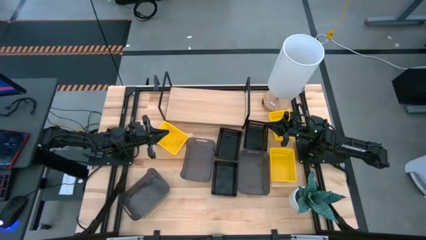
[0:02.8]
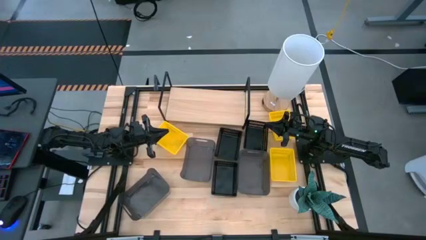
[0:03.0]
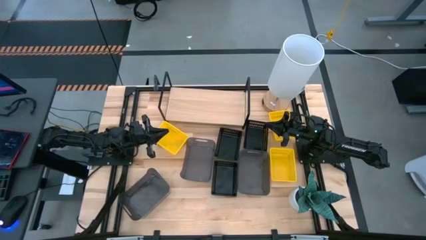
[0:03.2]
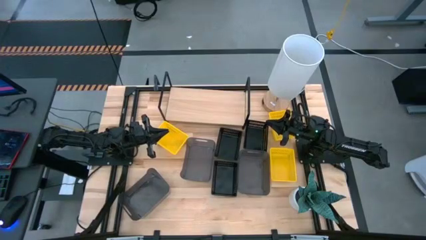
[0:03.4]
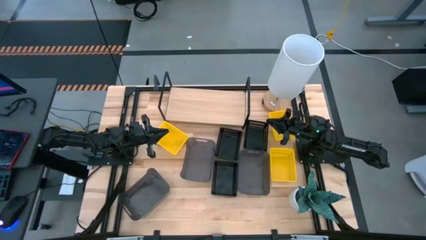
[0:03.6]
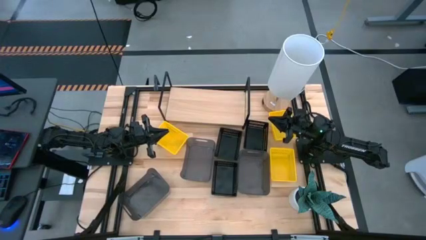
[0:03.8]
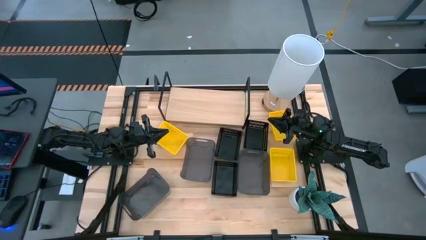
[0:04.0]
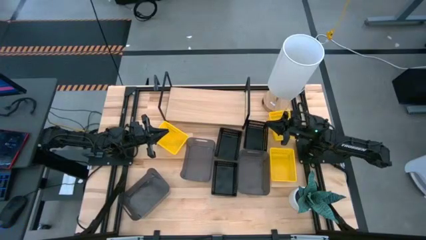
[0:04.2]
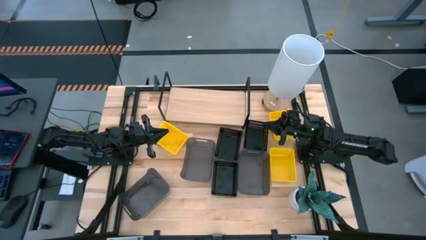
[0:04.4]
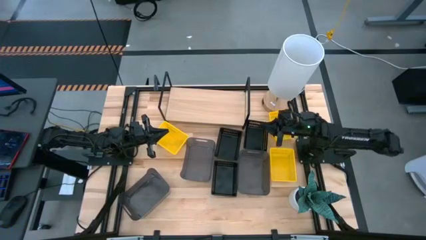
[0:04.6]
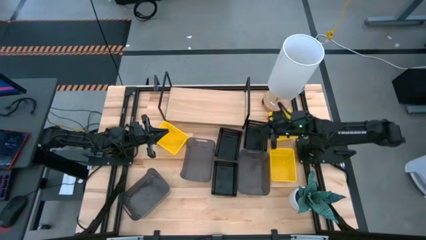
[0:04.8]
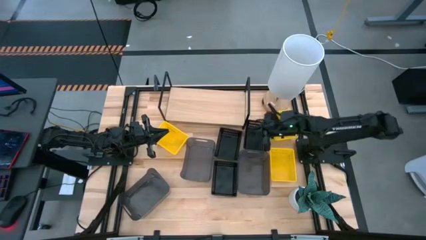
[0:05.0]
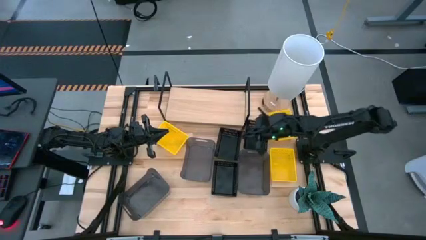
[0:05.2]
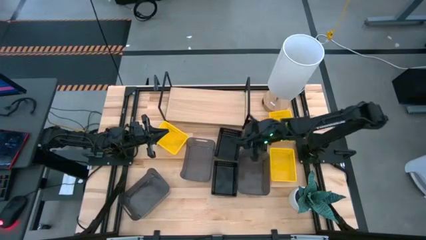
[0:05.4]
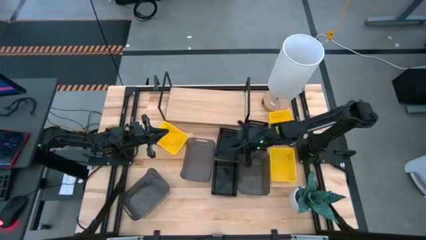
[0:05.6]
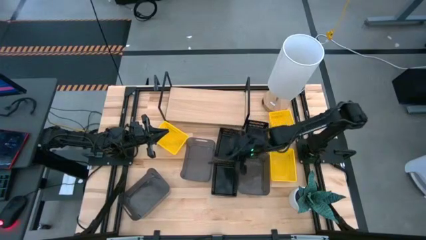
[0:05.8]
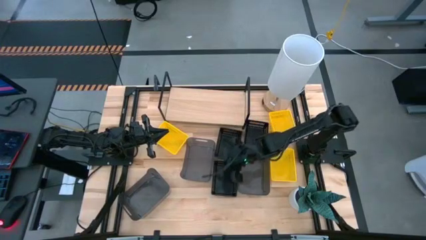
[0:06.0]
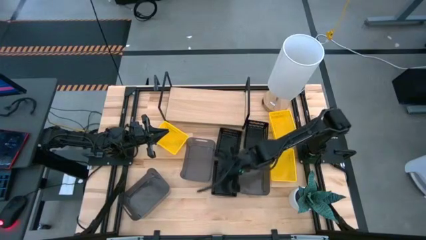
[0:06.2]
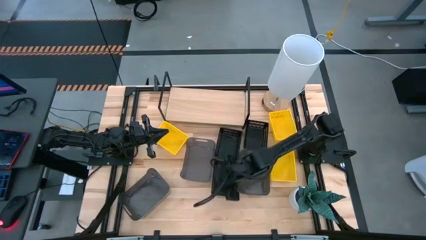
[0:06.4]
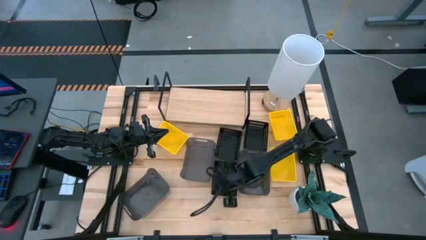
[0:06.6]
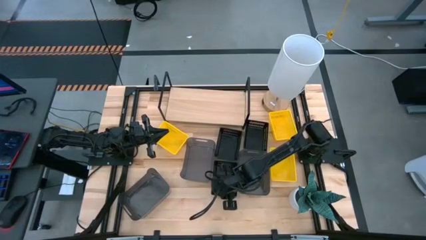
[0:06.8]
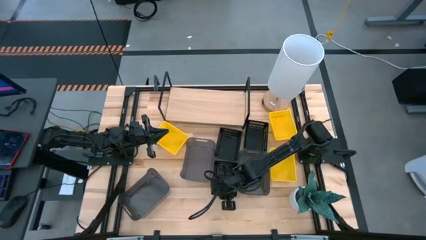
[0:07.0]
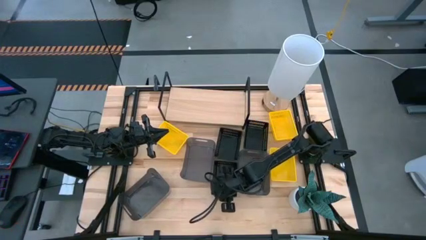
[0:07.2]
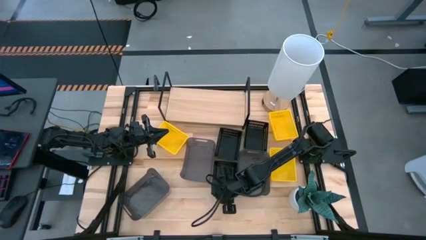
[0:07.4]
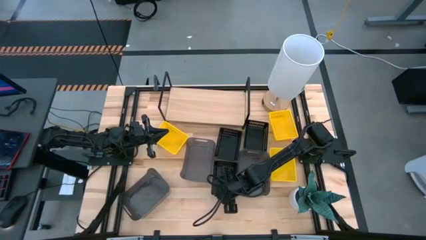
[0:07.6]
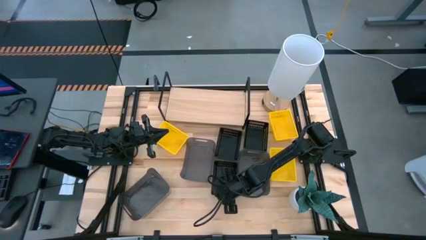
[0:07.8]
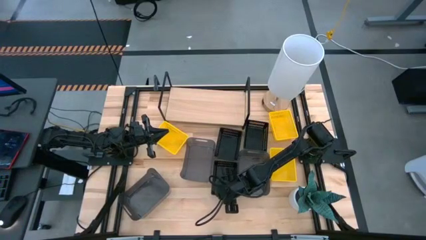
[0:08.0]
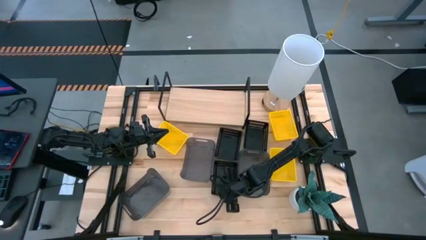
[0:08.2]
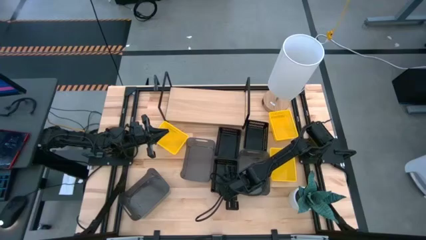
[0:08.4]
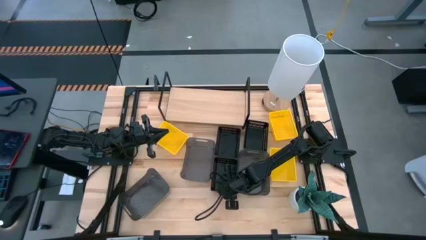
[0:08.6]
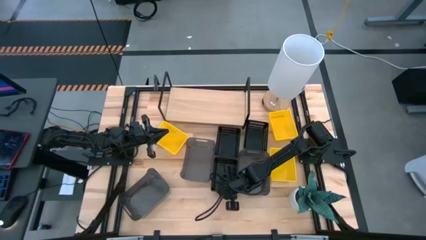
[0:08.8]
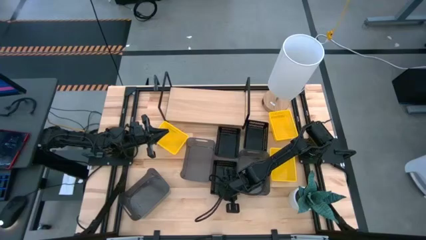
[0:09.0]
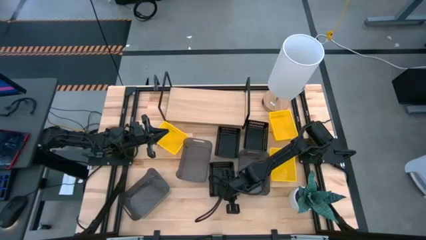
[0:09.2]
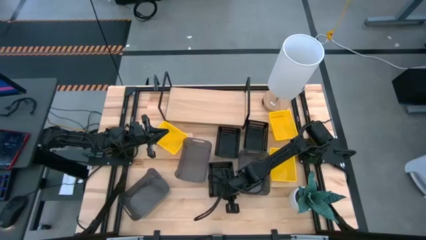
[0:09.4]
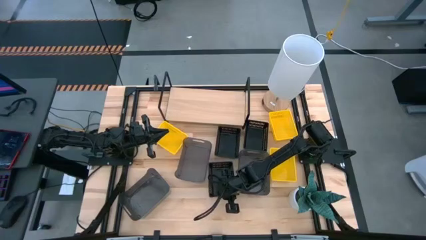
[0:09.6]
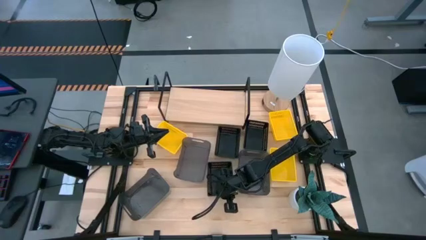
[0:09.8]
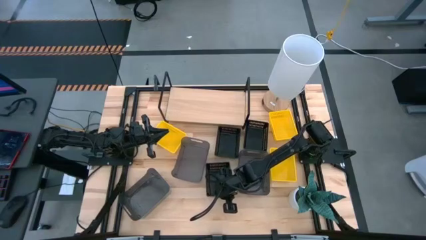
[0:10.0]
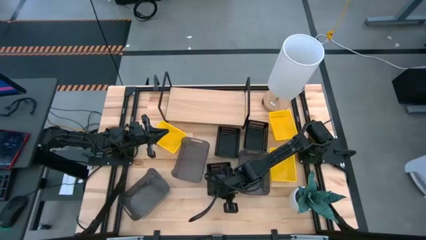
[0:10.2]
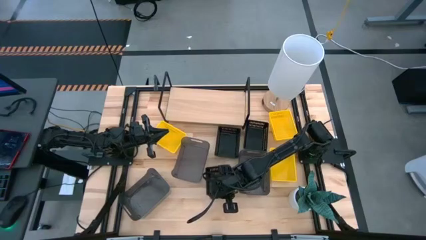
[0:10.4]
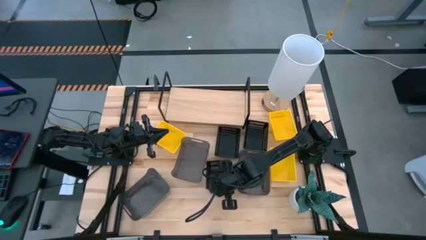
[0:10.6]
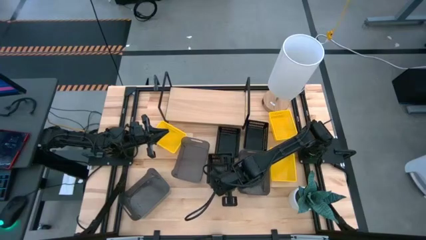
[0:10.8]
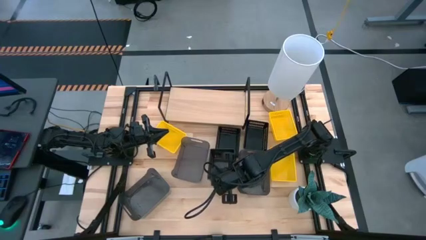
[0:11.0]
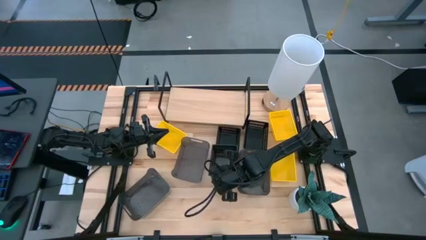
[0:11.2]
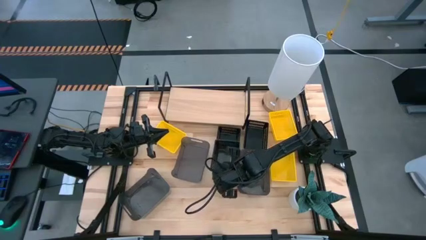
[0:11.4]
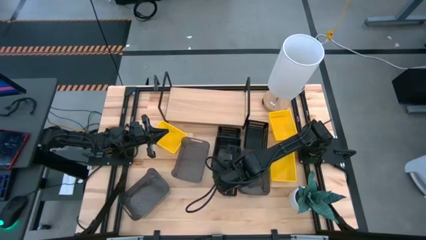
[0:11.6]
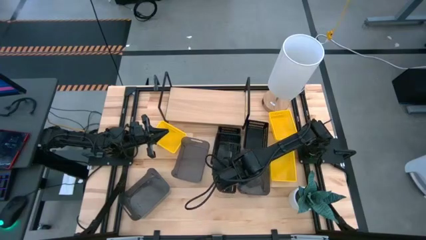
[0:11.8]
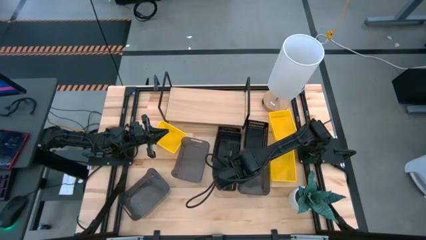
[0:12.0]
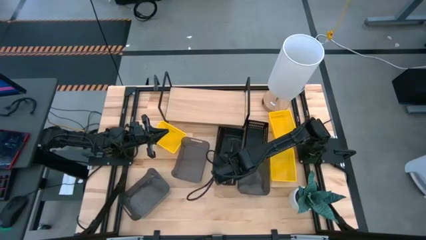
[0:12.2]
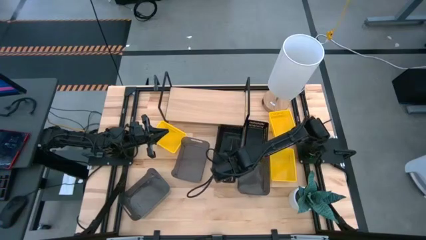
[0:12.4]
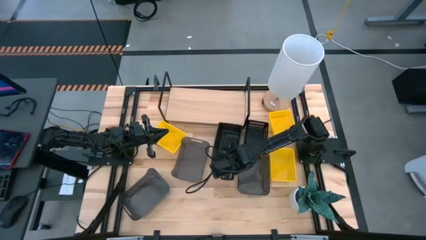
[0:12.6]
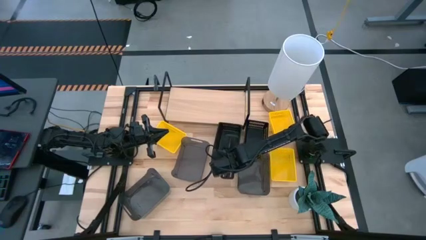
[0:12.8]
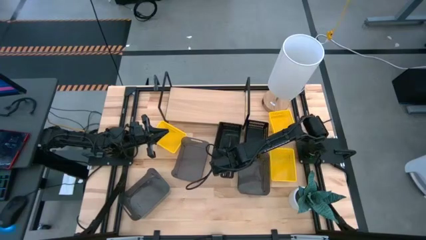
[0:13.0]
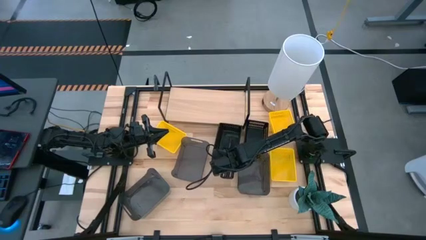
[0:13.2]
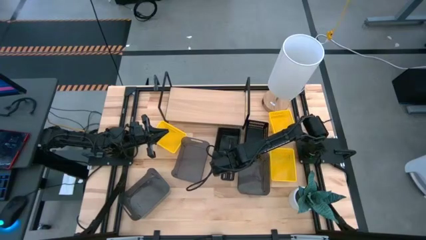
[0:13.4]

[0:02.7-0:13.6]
Task: Stack baskets on shelf by color
Stack the black bin on the top of the black bin

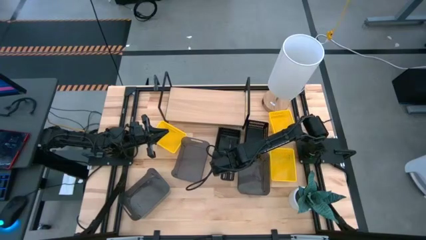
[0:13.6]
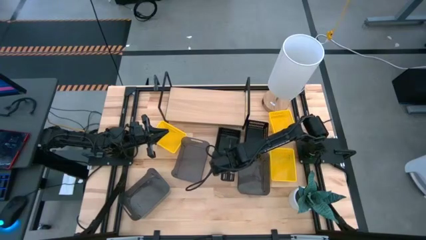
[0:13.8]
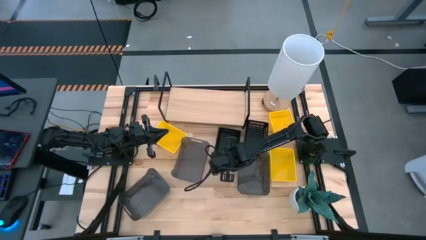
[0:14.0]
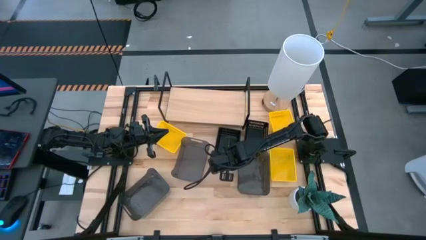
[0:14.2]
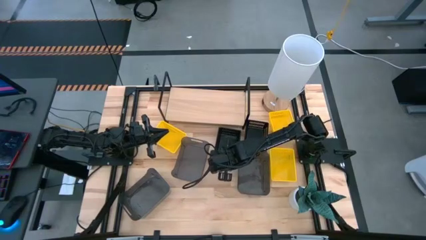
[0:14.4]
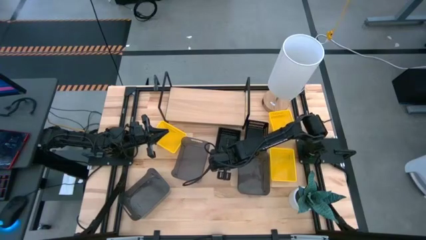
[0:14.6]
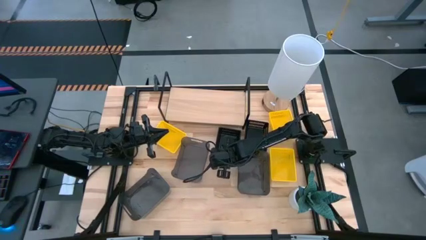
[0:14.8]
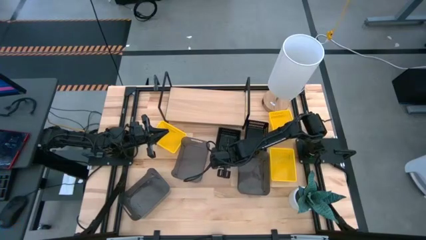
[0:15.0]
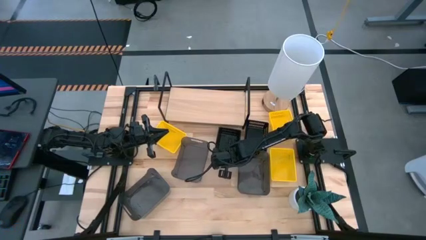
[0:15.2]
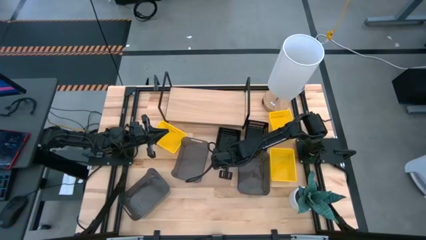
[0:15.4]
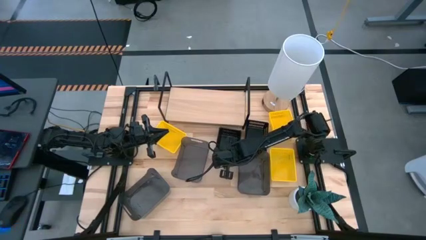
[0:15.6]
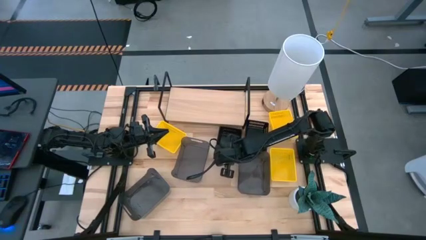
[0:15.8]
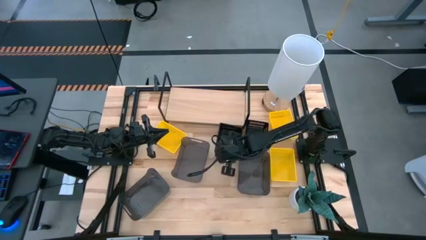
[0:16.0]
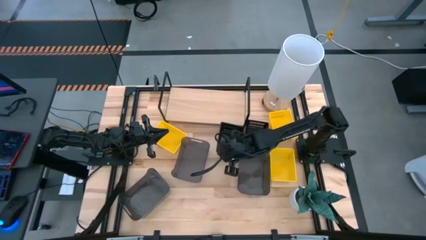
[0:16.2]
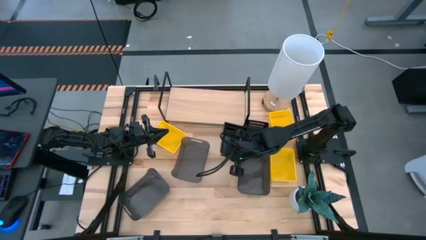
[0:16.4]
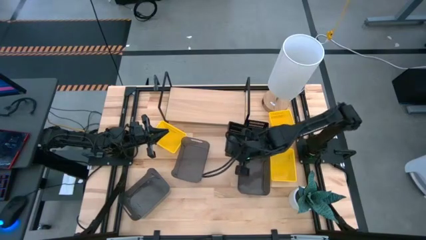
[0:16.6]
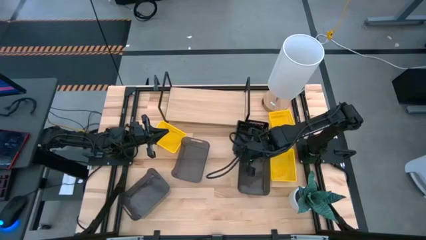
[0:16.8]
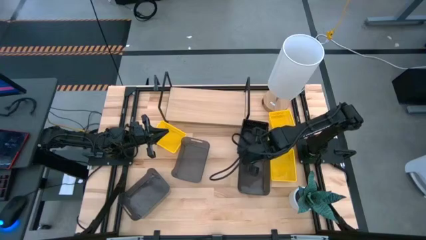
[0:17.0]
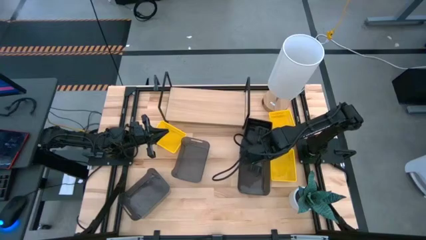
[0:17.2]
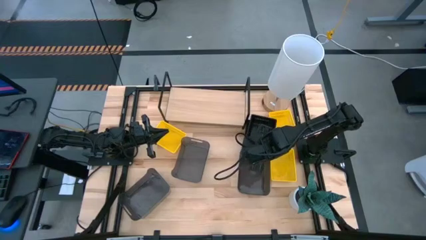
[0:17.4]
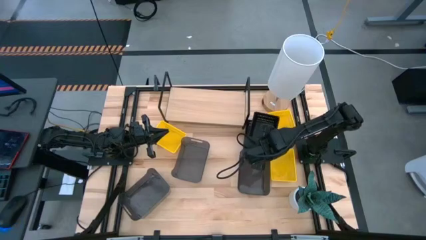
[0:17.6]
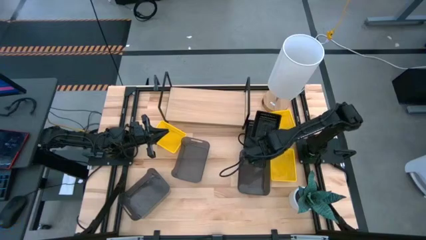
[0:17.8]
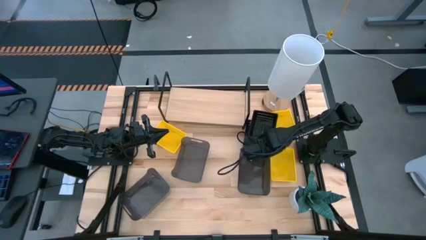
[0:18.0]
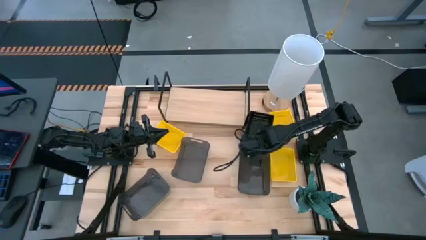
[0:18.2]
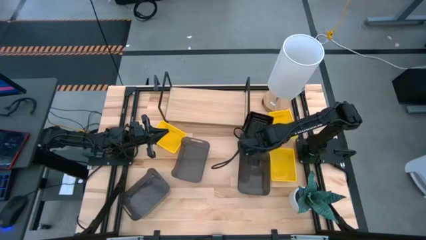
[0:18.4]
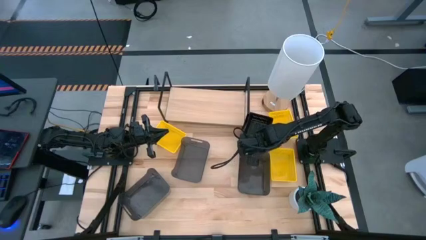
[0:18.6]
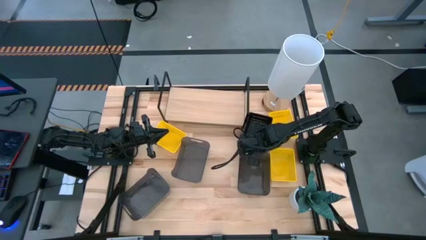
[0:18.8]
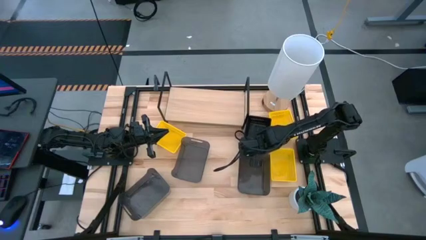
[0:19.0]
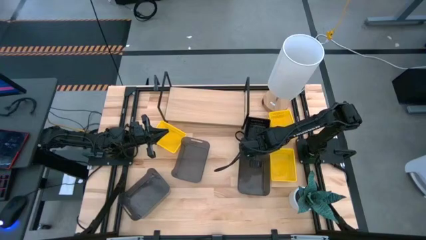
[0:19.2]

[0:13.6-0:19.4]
Stack the black bin on the top of the bin
